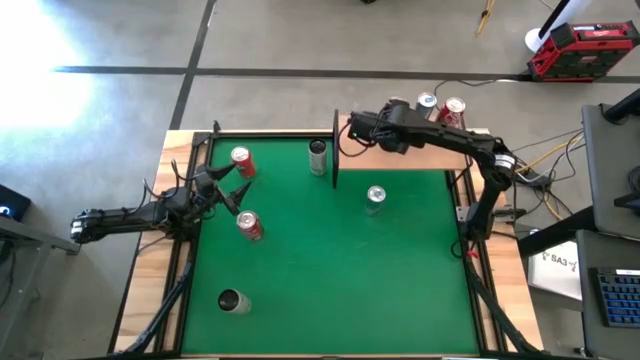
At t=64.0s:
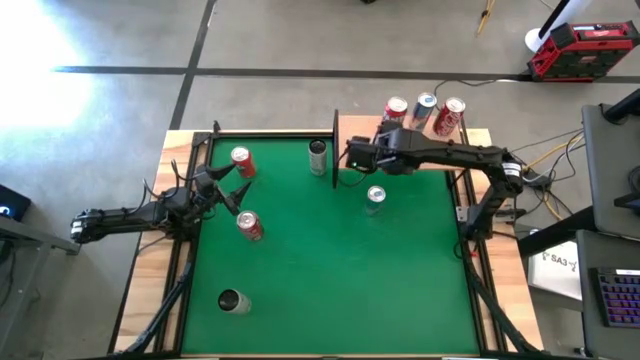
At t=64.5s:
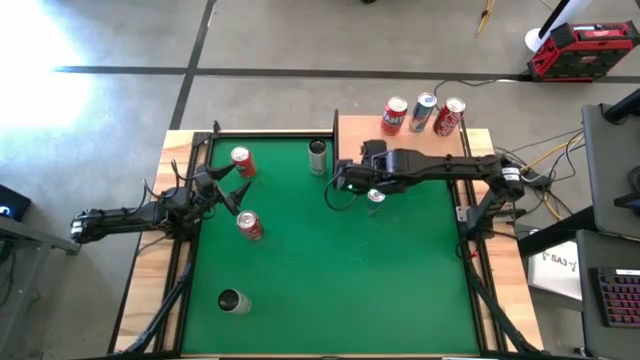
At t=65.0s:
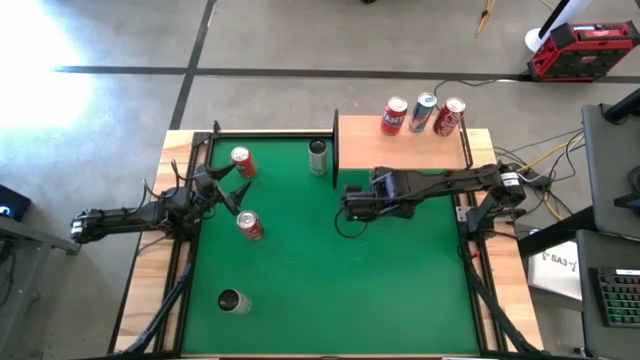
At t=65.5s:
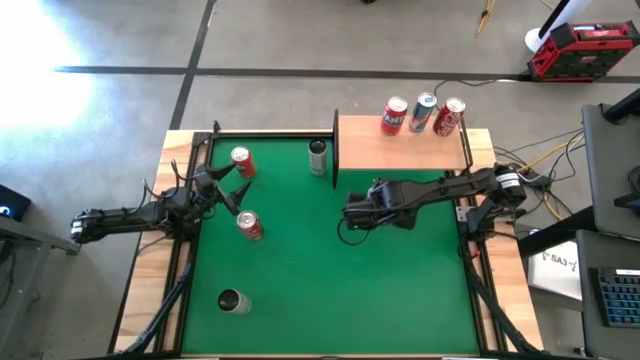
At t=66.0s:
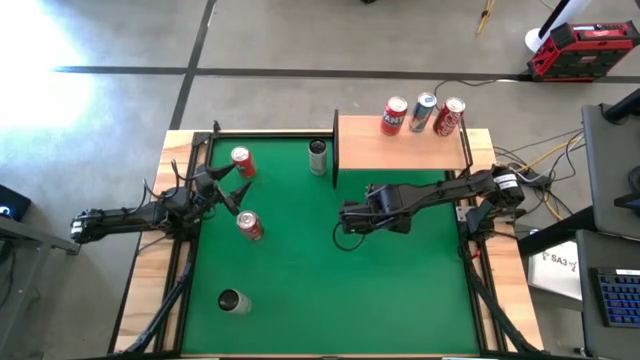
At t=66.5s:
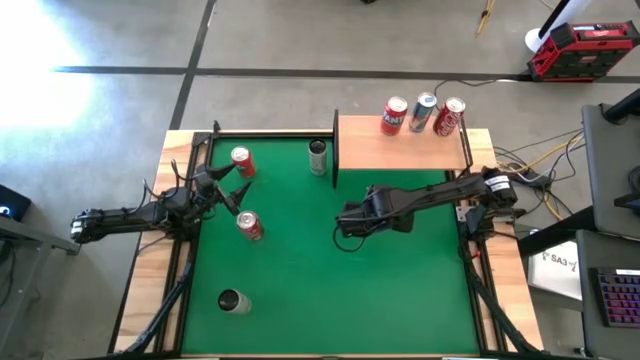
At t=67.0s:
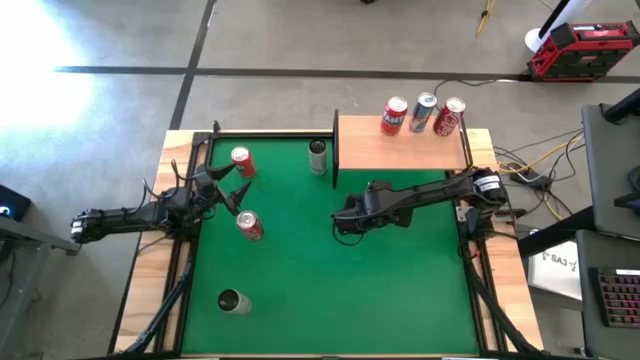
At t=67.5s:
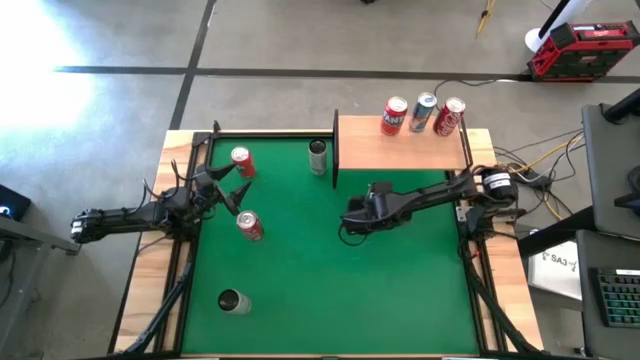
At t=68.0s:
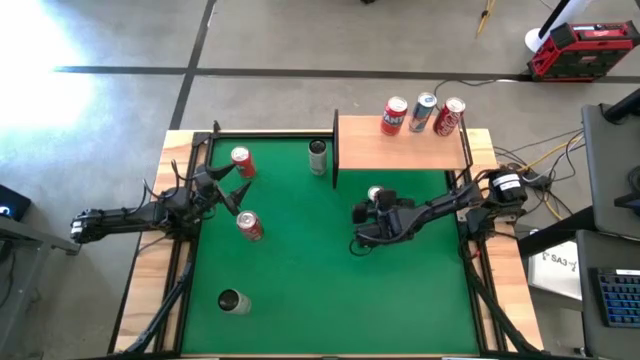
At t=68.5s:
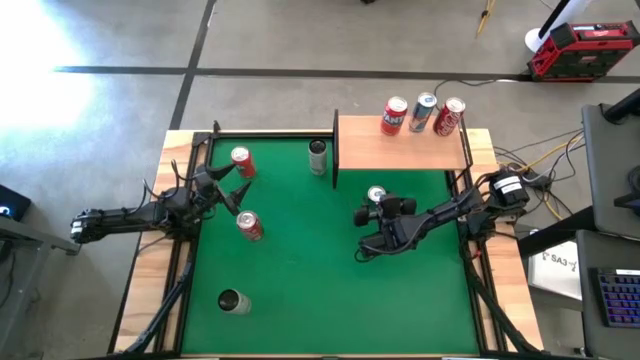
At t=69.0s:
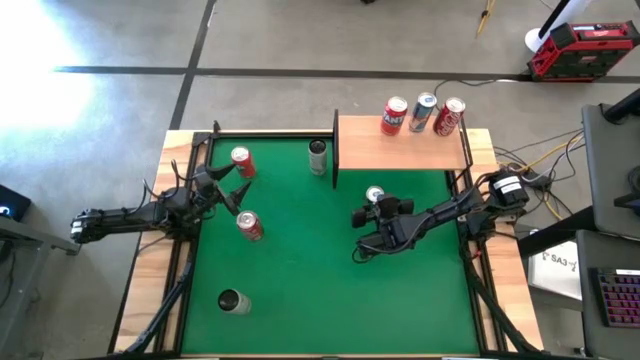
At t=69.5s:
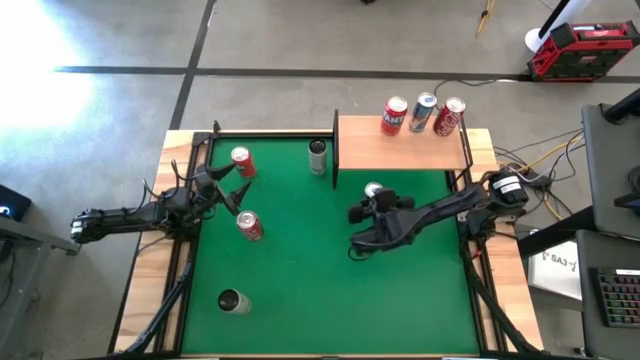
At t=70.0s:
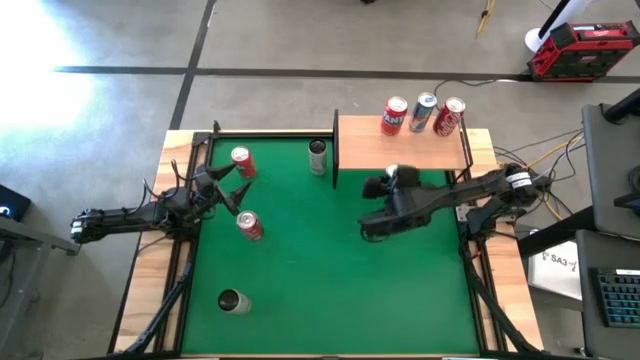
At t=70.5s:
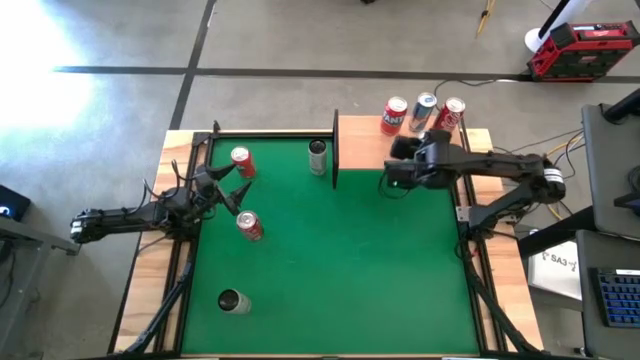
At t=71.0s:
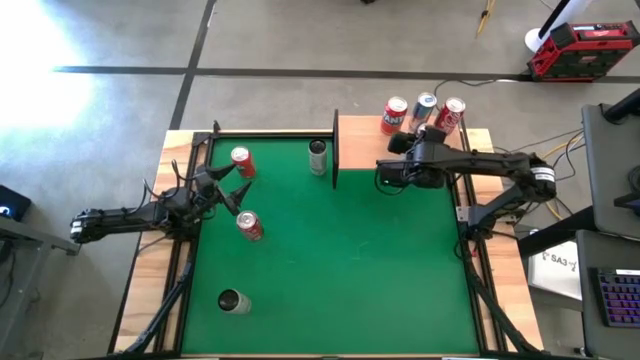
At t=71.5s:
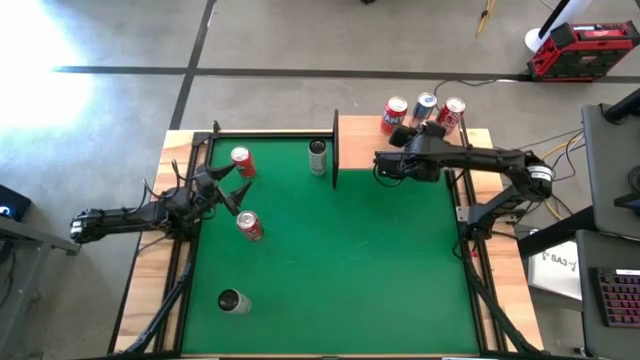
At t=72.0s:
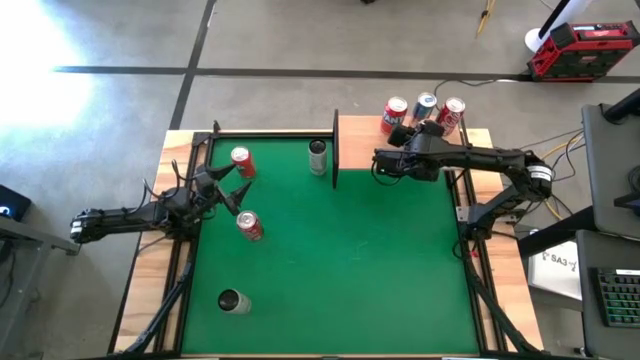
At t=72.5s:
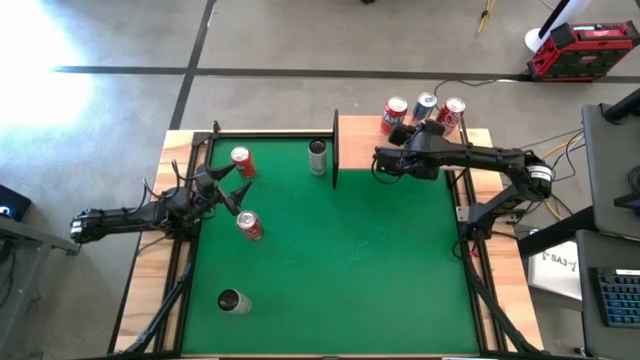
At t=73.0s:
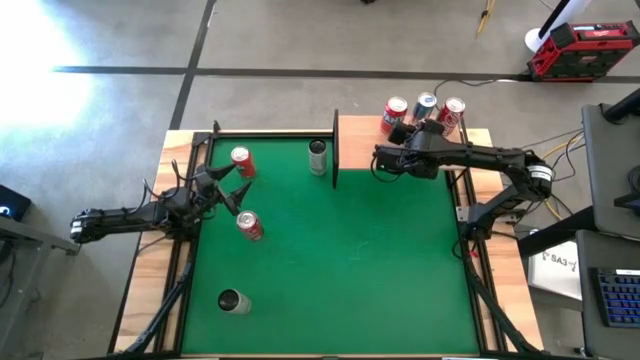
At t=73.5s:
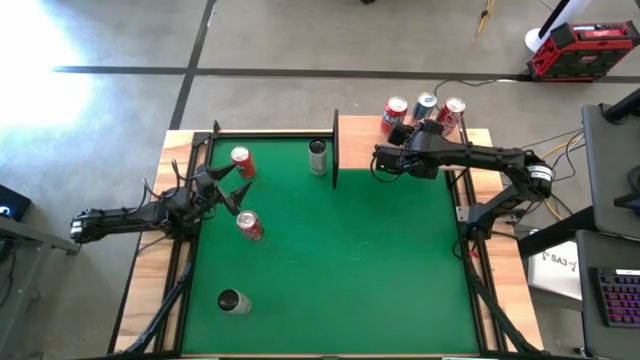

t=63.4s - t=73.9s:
Task: Place canned beverage on shelf
Put the blue soda can on the shelf aligned with the other blue soda can

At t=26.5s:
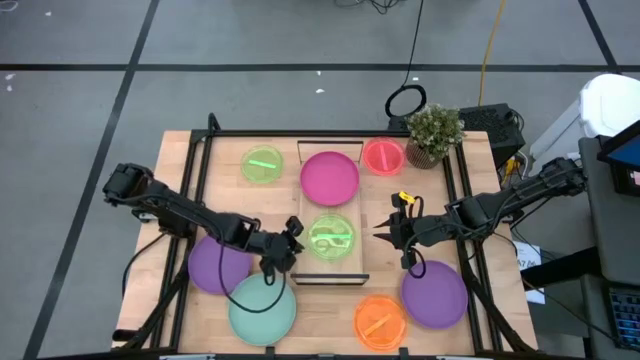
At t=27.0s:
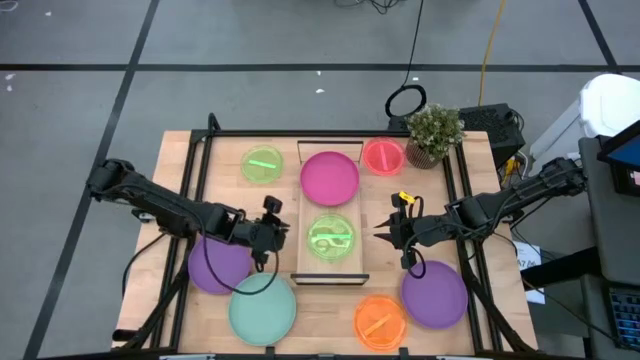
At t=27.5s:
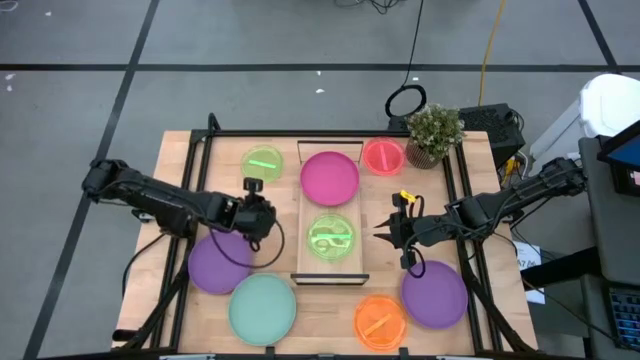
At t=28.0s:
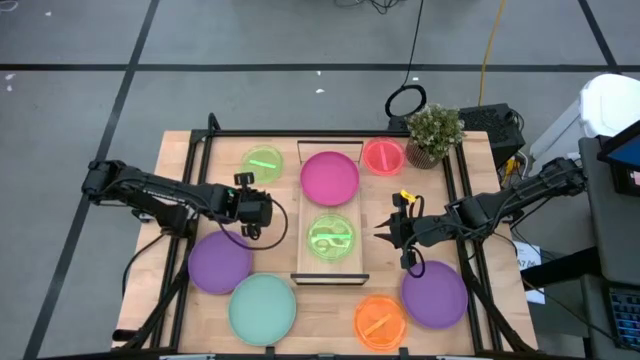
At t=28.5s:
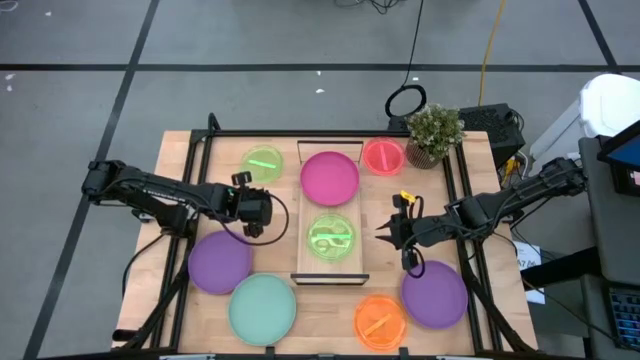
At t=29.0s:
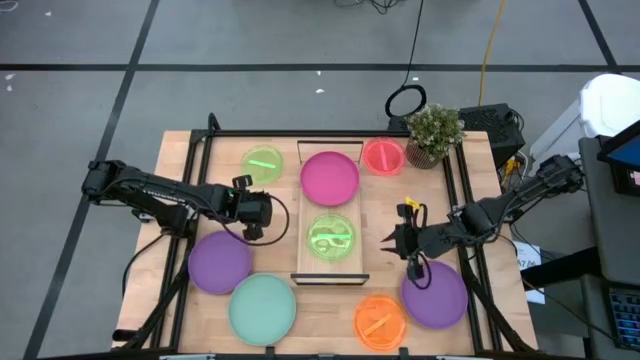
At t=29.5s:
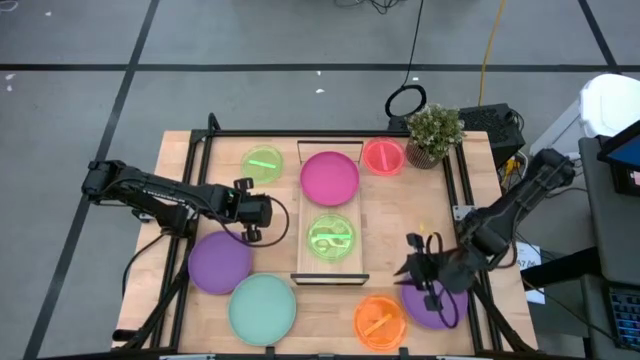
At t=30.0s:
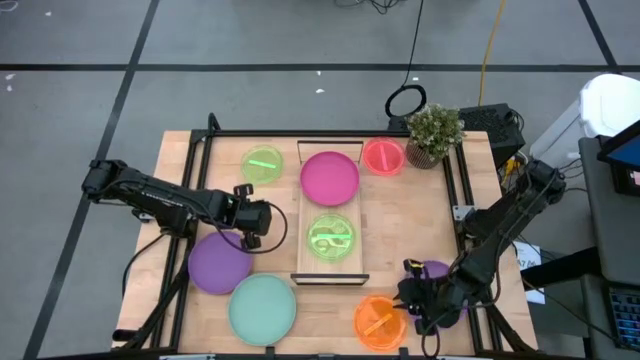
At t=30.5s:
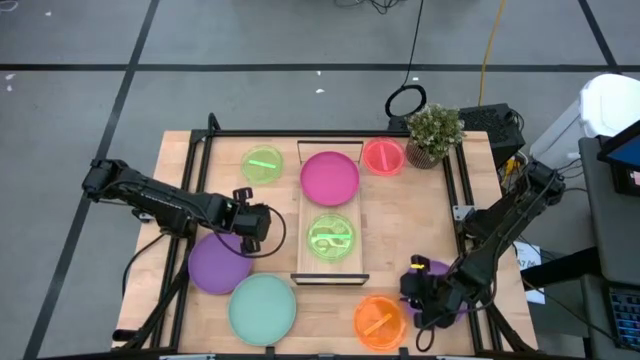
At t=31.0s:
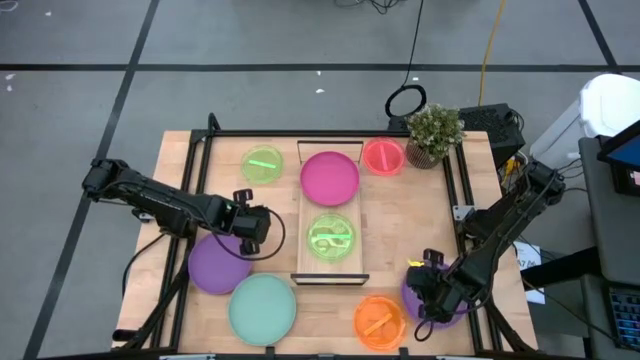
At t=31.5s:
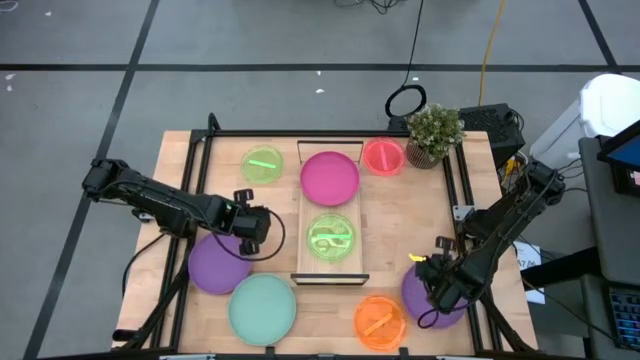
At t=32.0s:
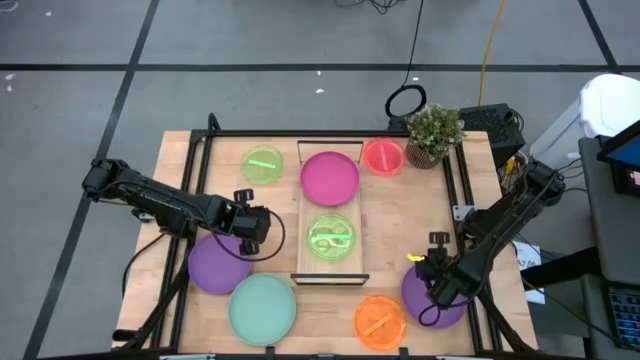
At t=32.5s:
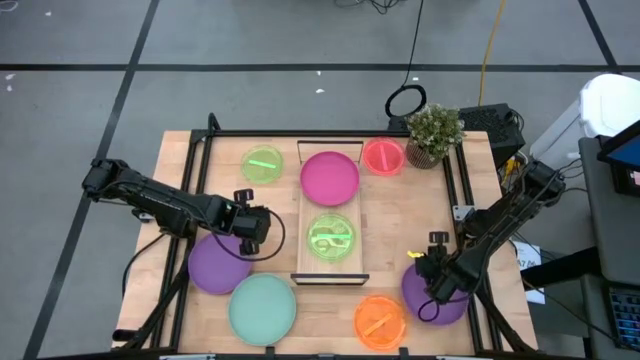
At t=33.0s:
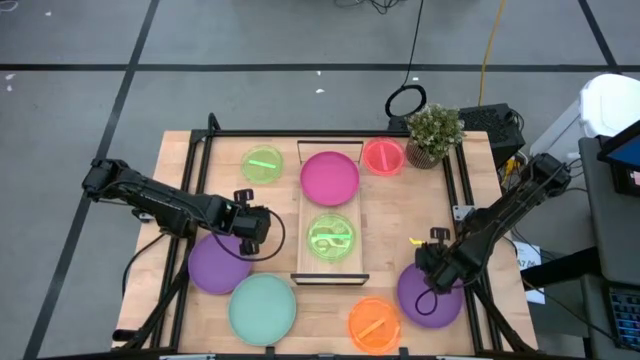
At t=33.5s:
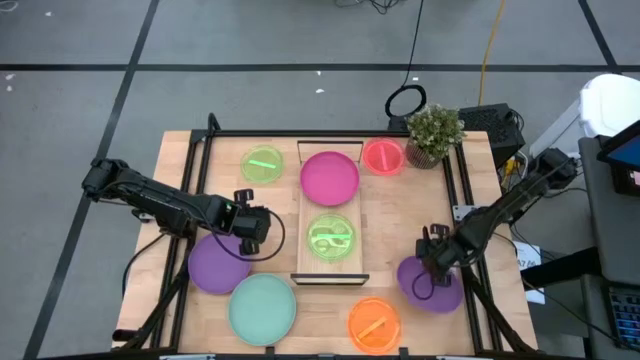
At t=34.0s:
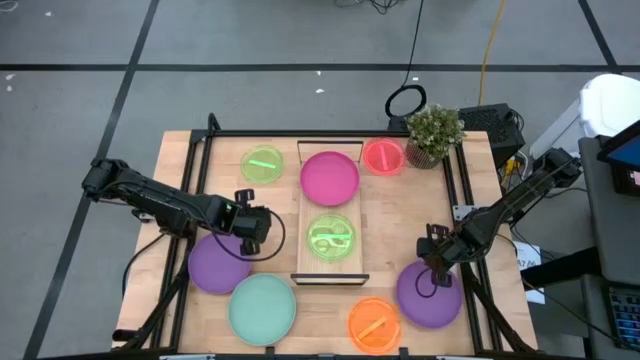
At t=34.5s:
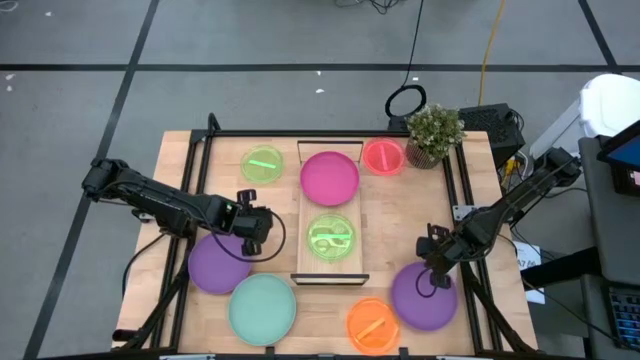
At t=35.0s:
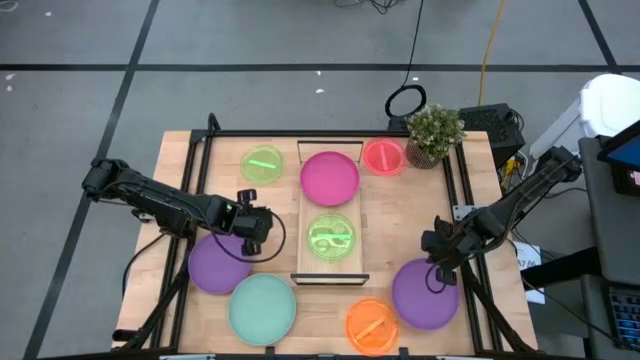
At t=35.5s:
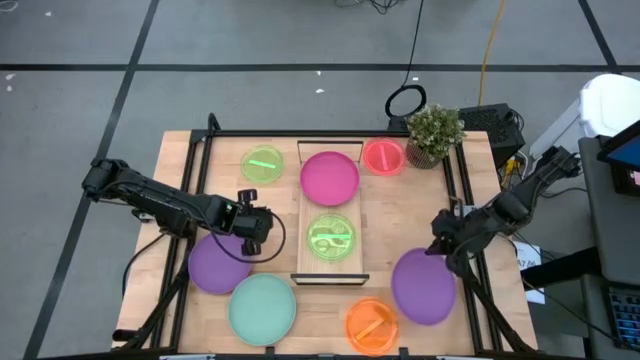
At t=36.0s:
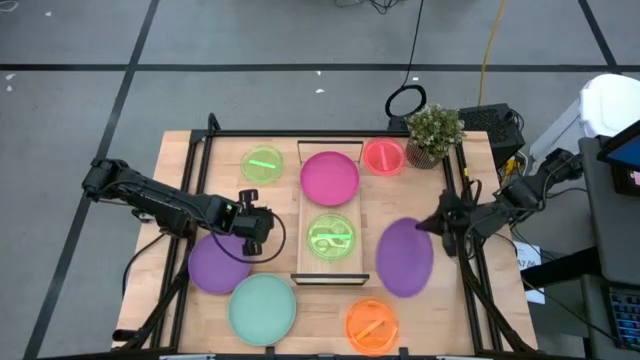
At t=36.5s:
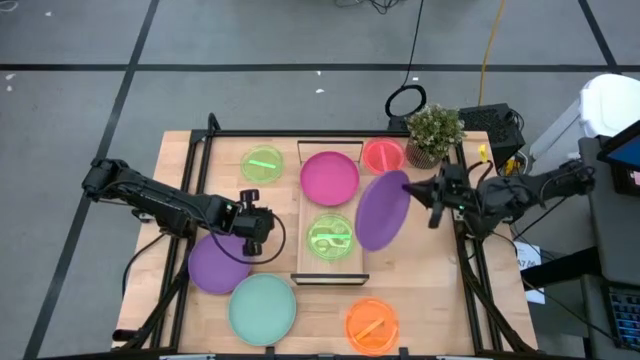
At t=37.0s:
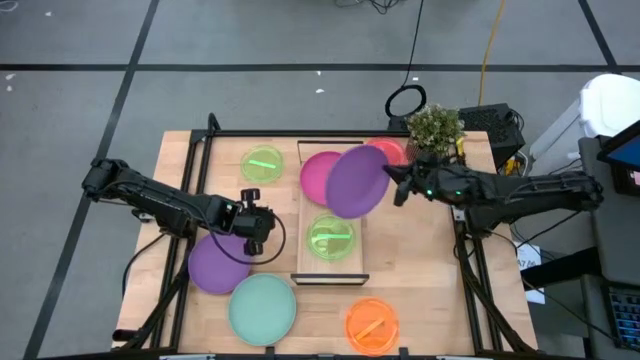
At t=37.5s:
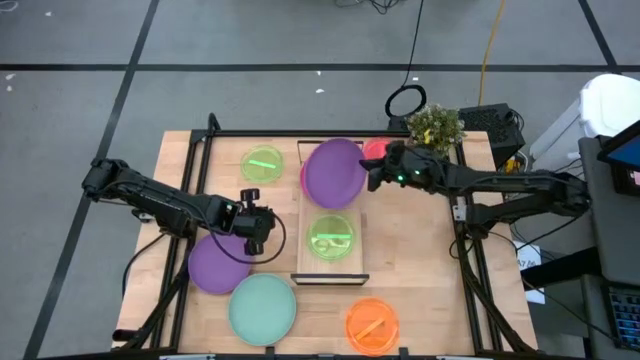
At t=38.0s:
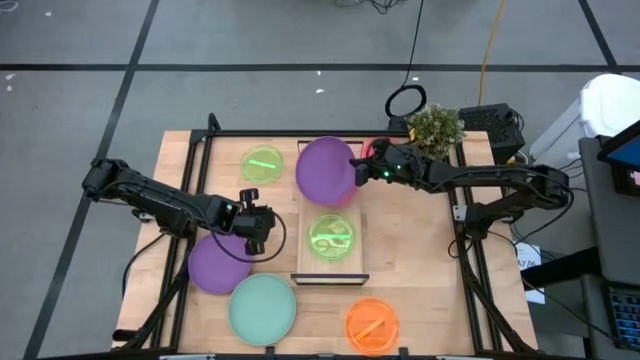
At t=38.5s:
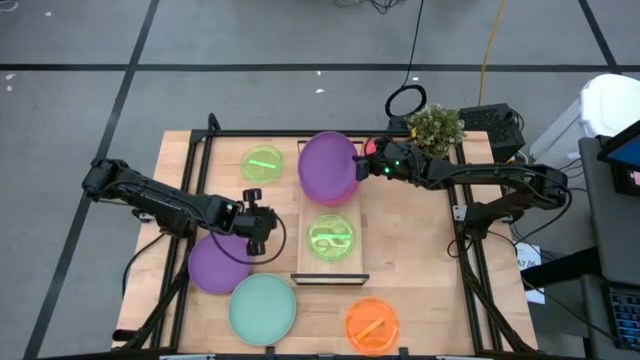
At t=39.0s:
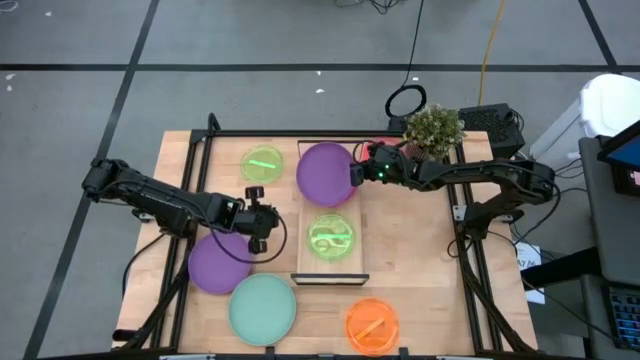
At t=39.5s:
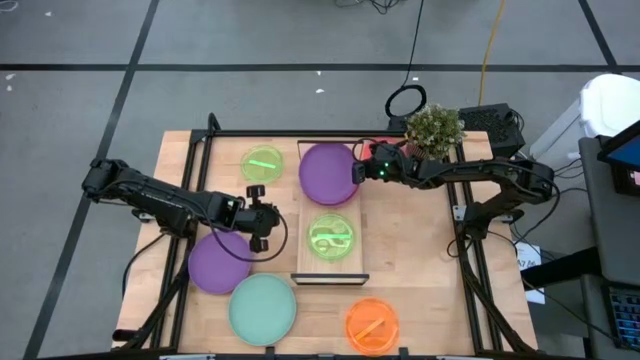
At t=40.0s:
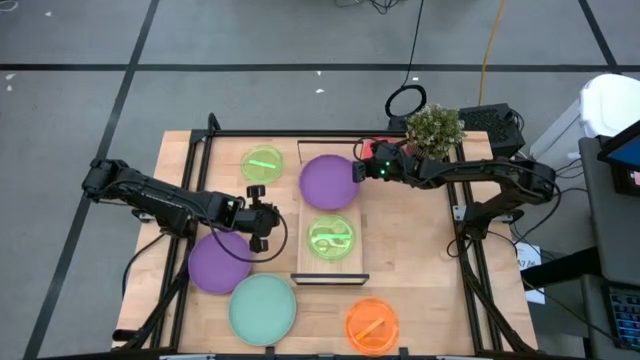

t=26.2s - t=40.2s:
Task: Place and stack plates onto a shelf
Stack the right purple plate on top of the pink plate on the shelf
